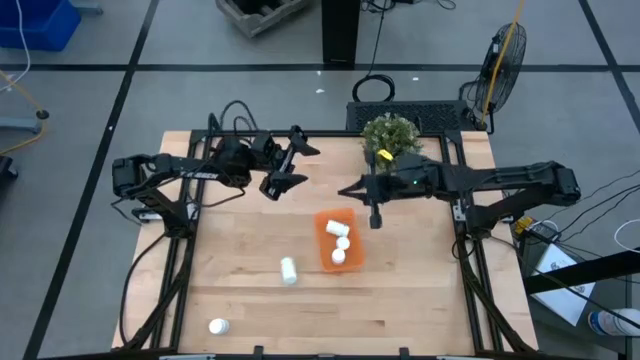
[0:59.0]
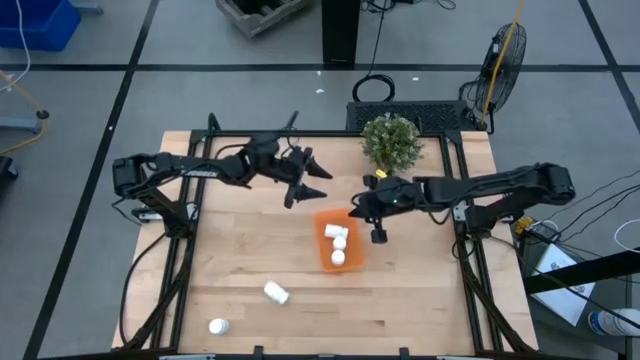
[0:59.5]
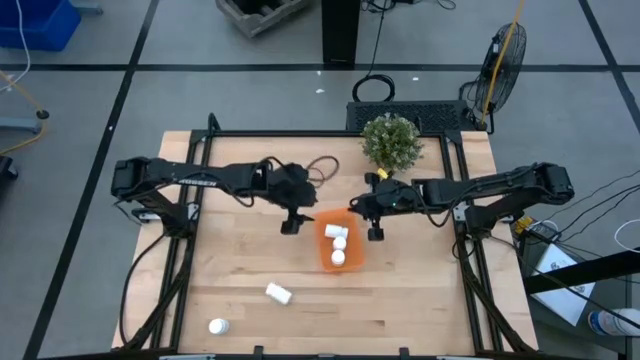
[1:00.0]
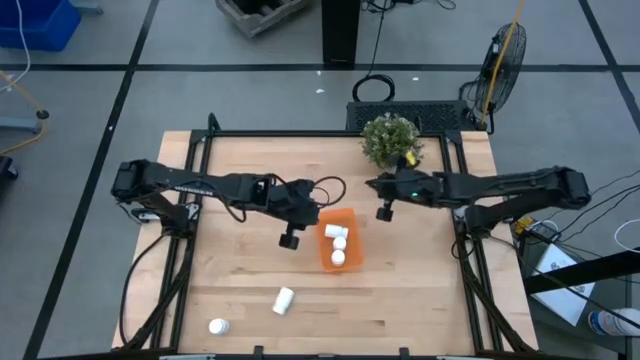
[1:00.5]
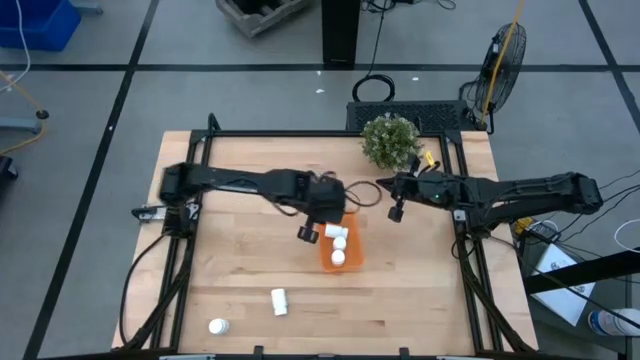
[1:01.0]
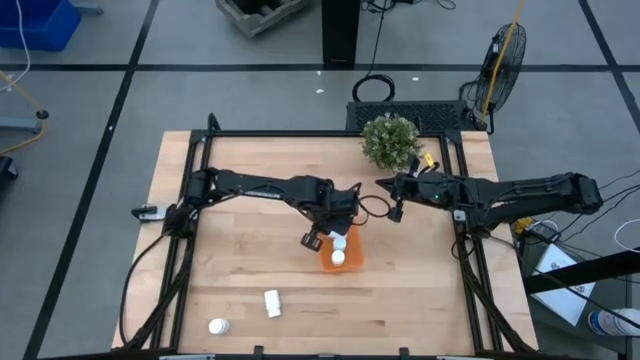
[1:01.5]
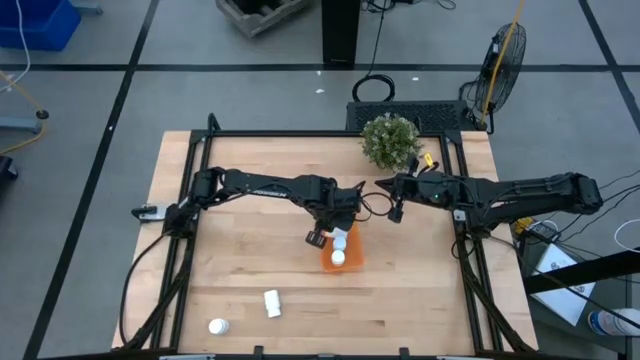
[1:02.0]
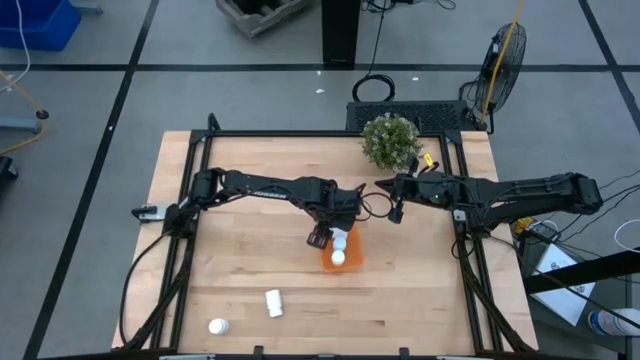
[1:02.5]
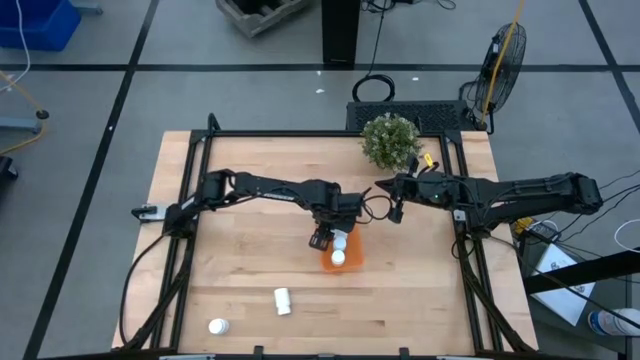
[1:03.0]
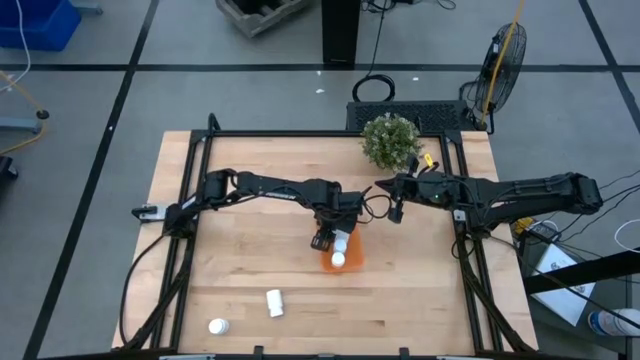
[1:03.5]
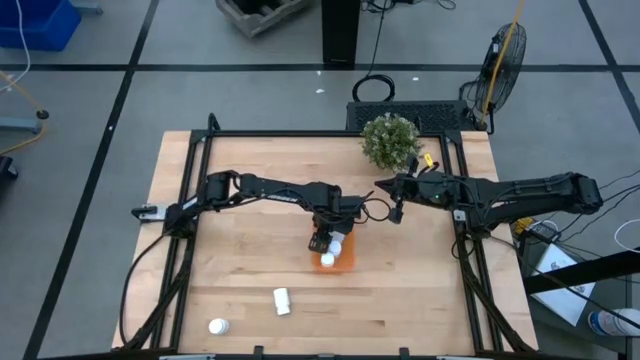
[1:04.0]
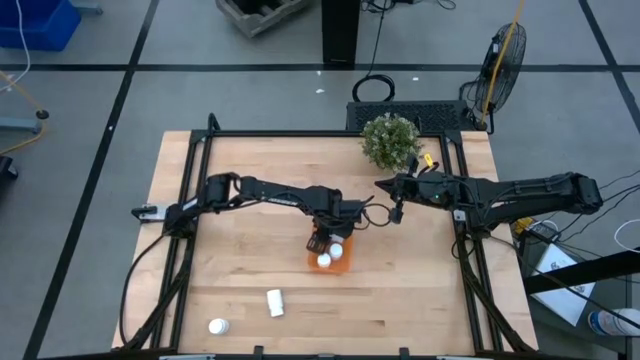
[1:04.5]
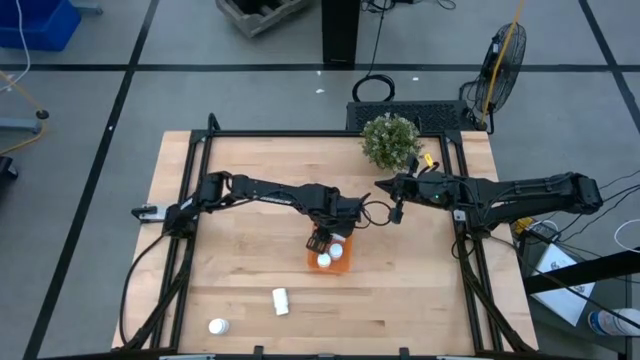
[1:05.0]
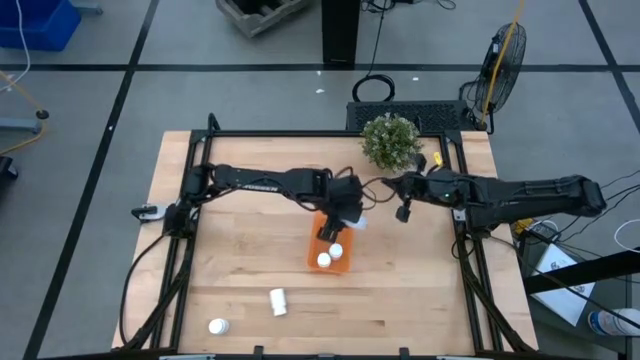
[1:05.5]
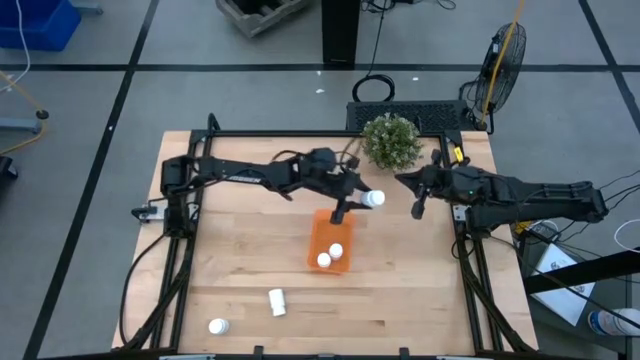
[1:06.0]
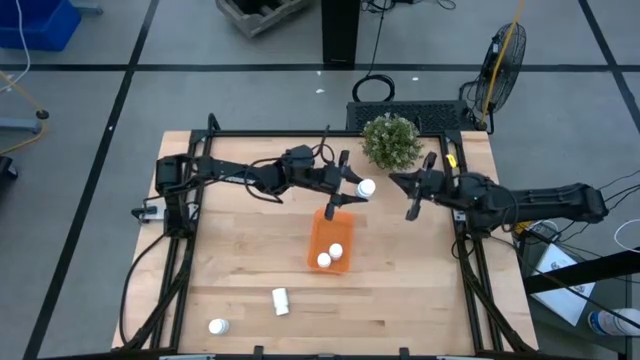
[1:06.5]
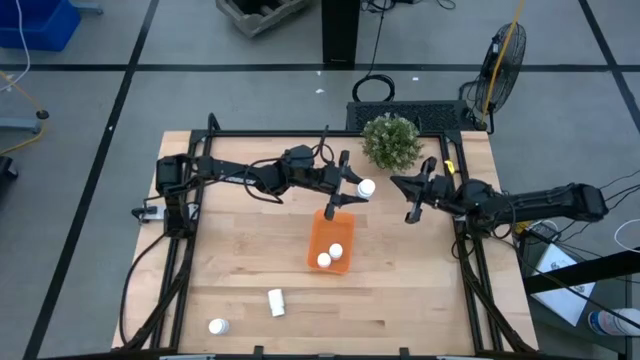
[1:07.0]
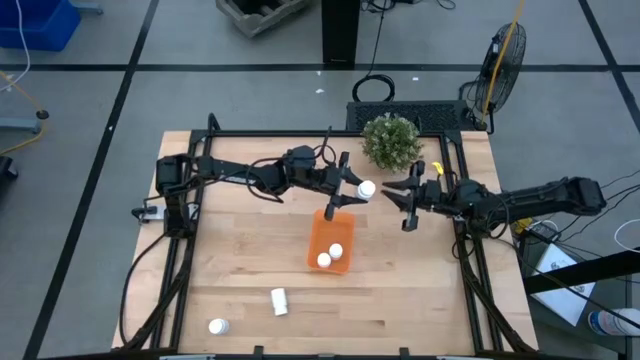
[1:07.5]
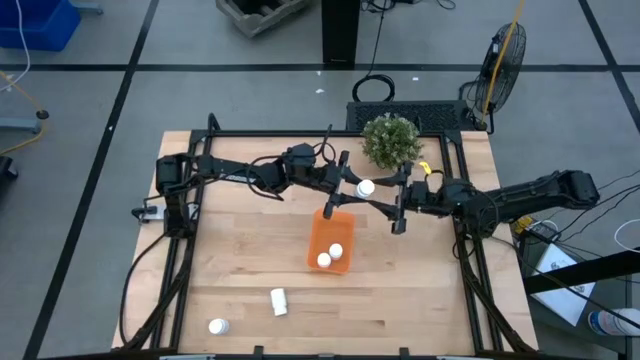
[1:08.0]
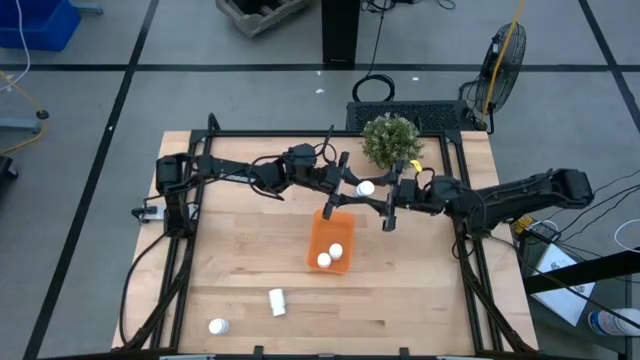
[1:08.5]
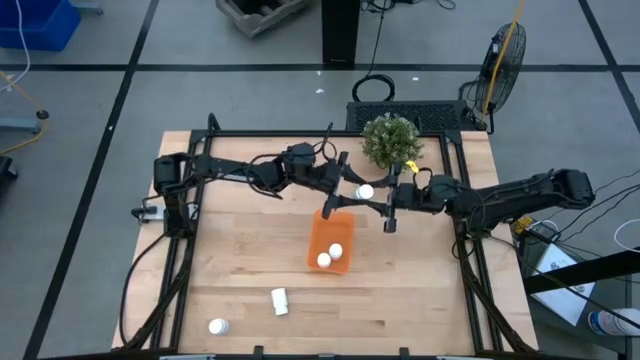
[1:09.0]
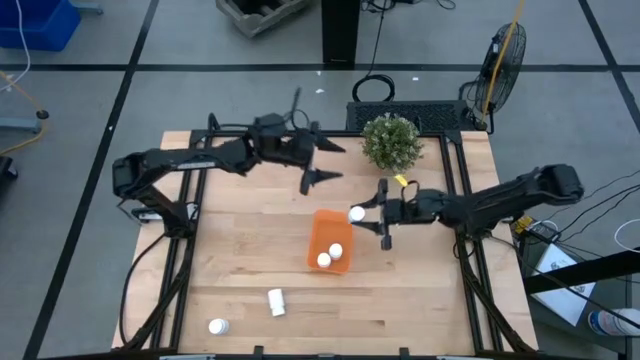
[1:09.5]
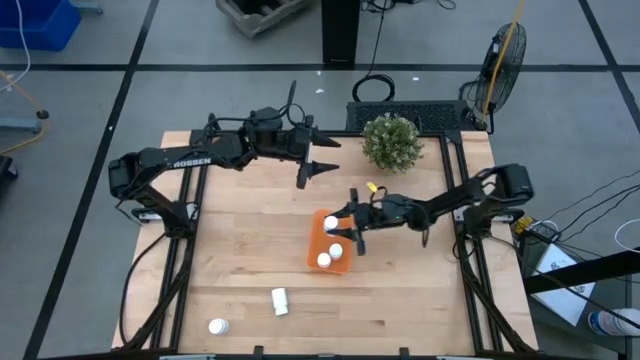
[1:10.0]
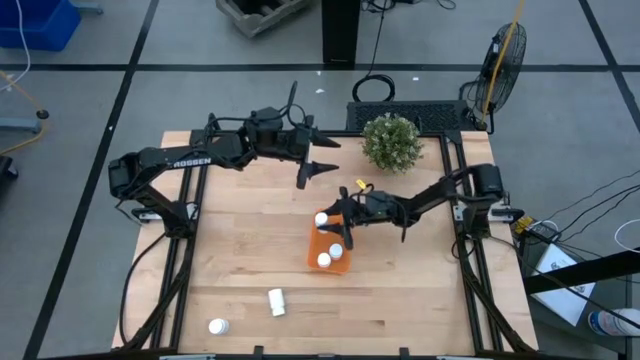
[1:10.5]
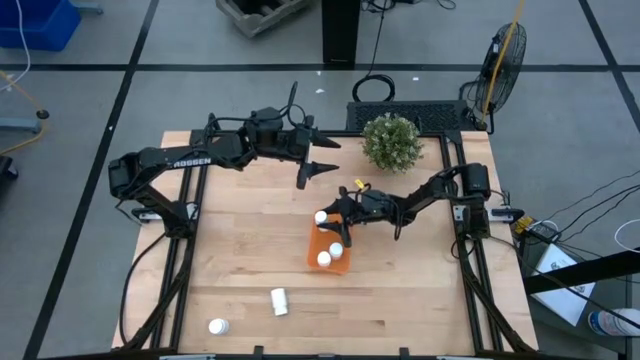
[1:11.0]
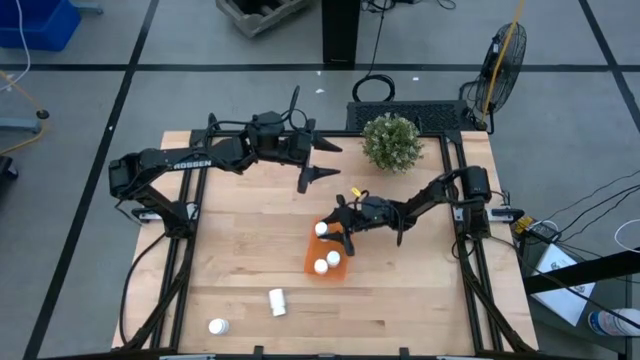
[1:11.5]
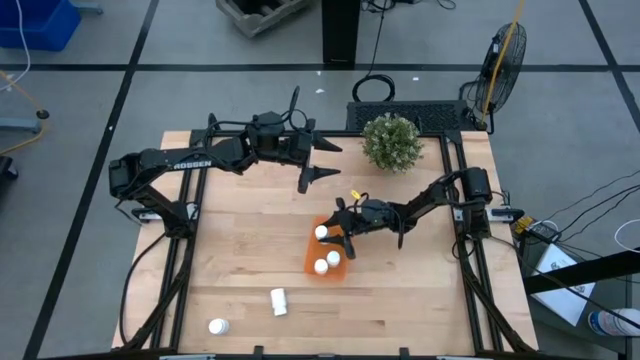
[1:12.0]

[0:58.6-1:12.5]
Task: Pick and place pill bottles into a basket
Adjust the white pill bottle in the orange container

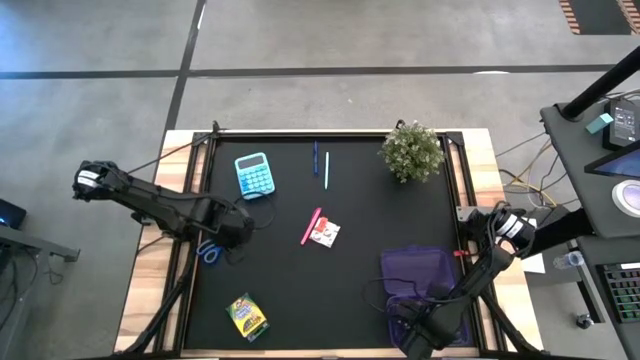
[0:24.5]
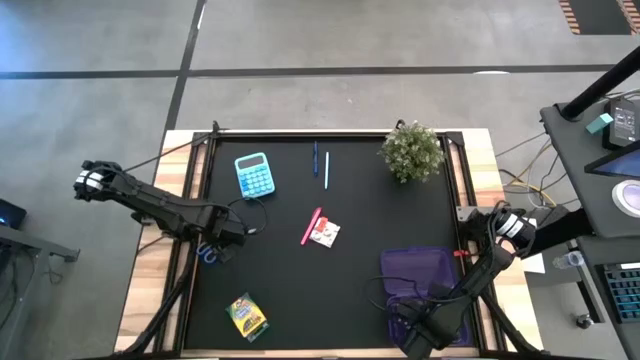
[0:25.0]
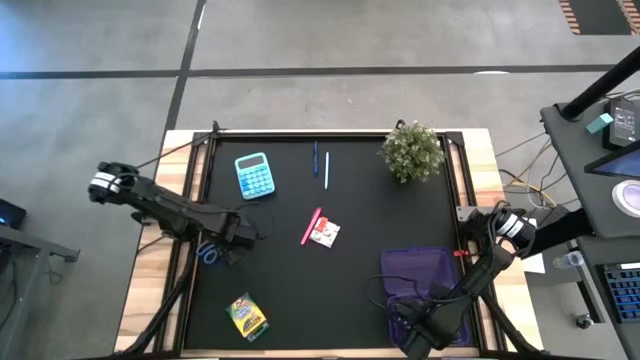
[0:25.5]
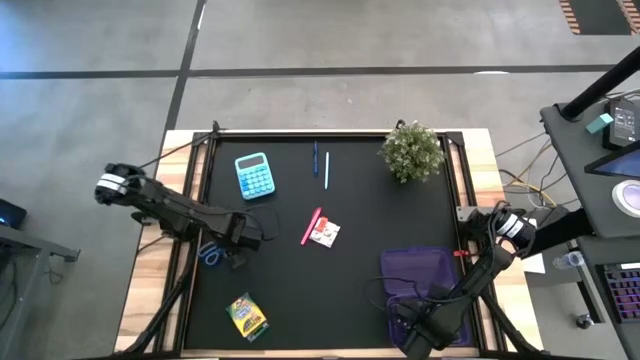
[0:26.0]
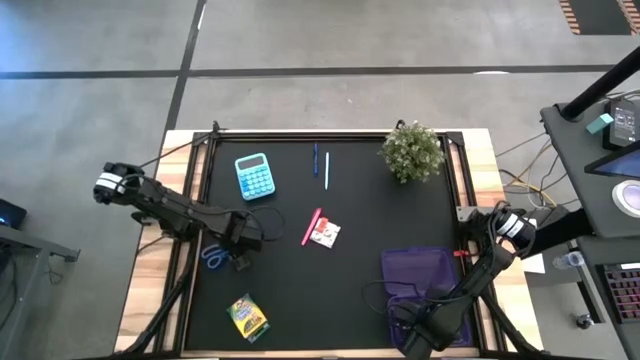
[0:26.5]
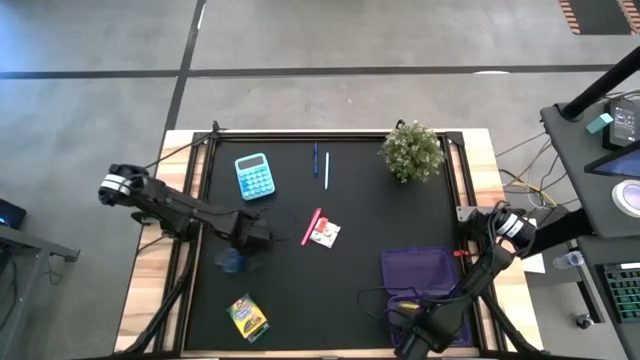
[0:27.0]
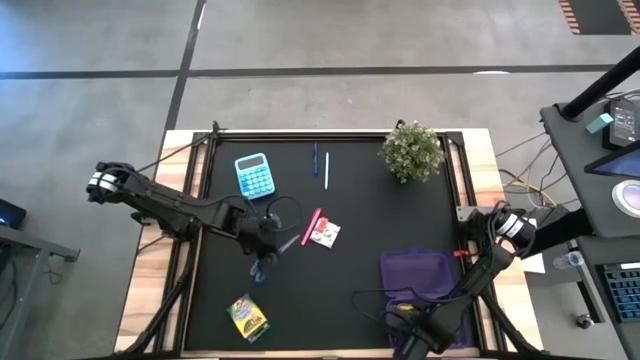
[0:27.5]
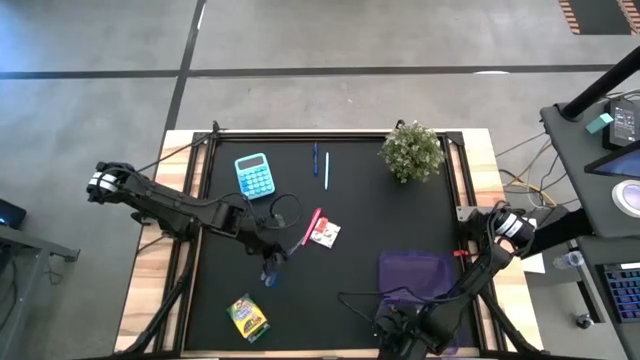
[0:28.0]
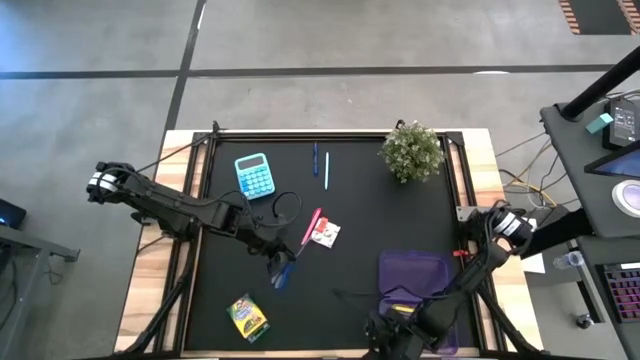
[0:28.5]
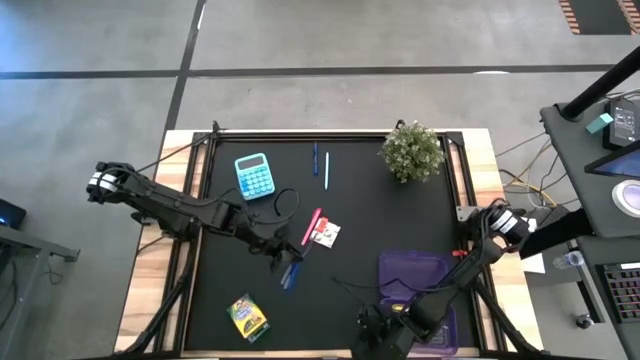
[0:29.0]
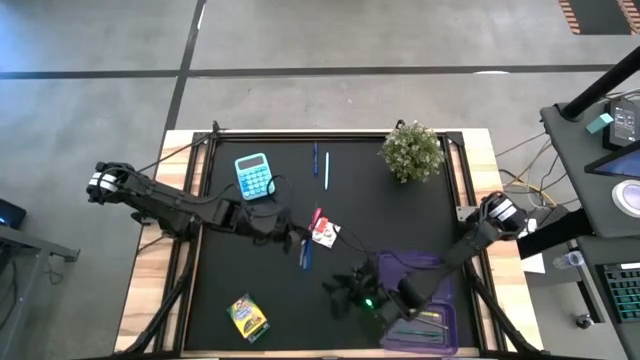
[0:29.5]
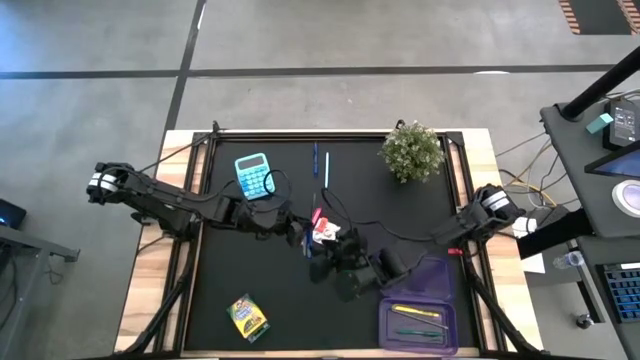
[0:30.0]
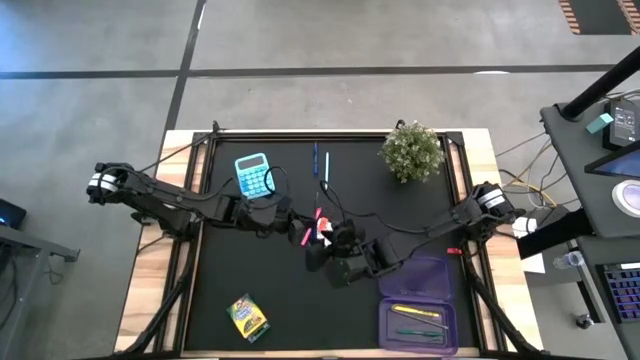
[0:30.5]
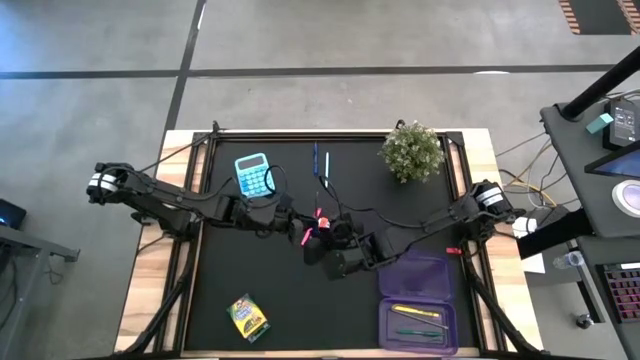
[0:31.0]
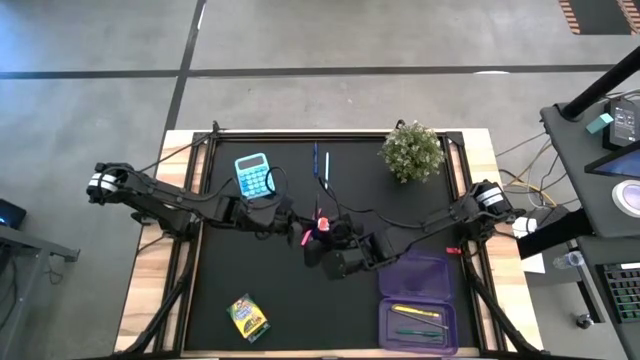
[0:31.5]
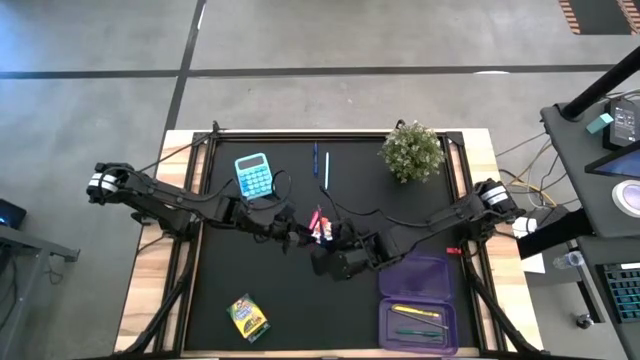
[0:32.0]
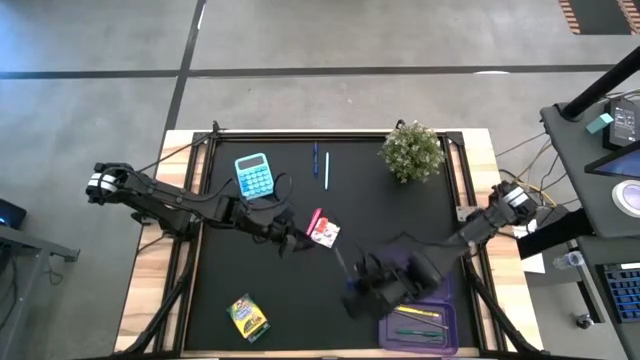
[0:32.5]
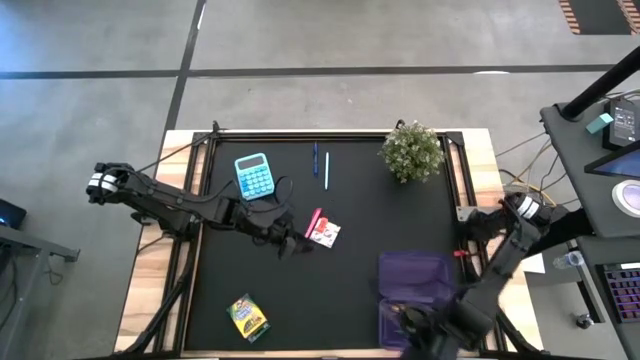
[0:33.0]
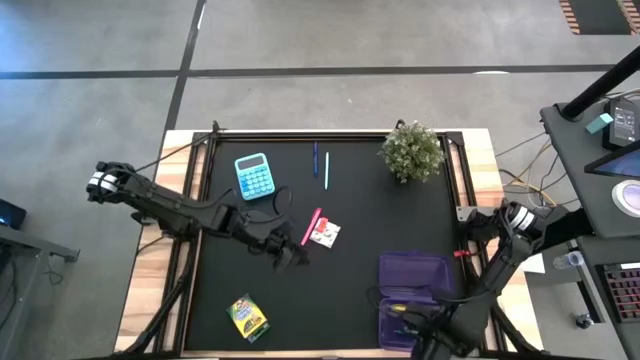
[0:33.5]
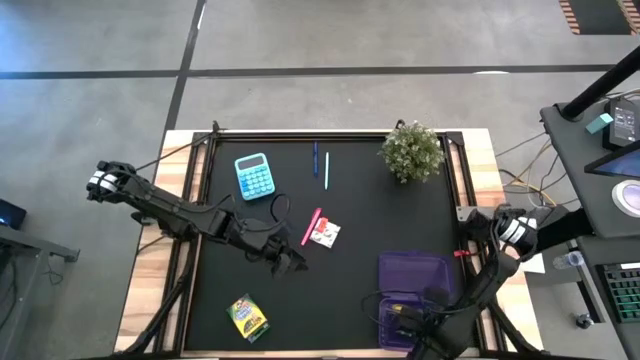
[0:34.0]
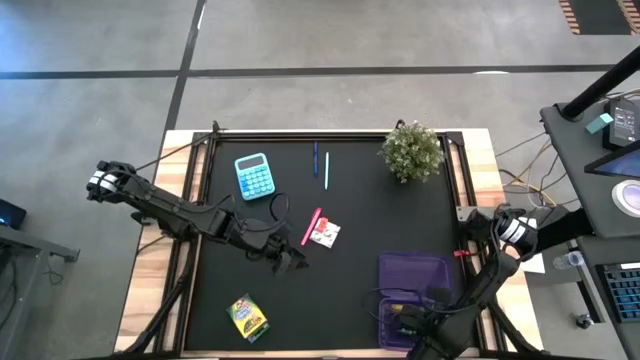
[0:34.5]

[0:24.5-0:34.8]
Task: Pack school essentials
Put the blue scissor into the purple supply box
